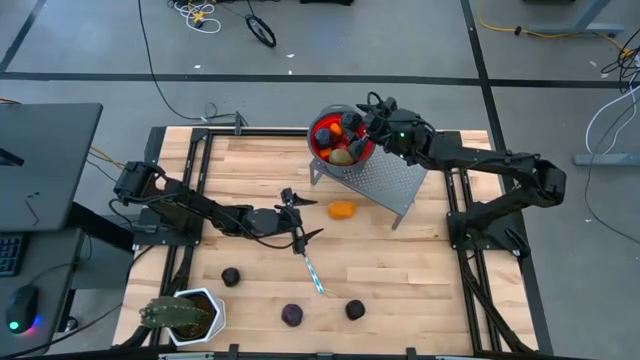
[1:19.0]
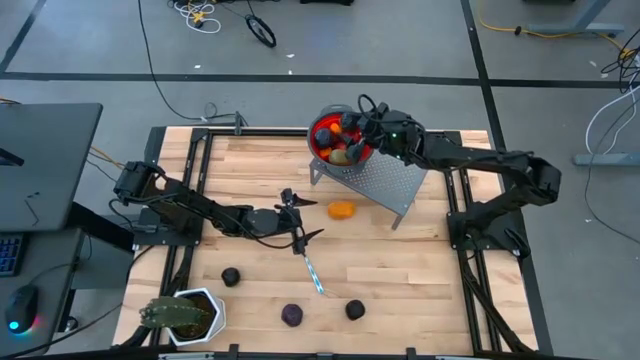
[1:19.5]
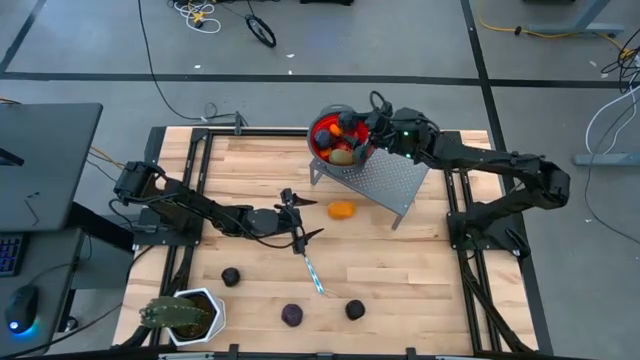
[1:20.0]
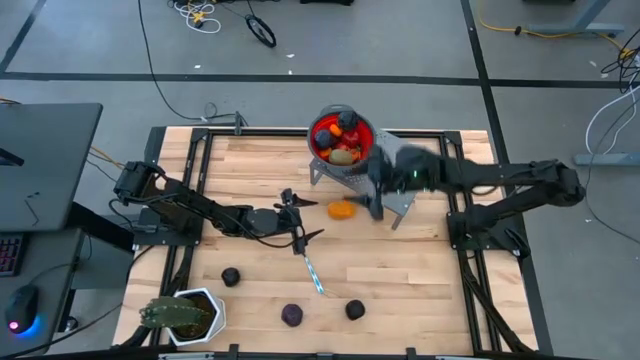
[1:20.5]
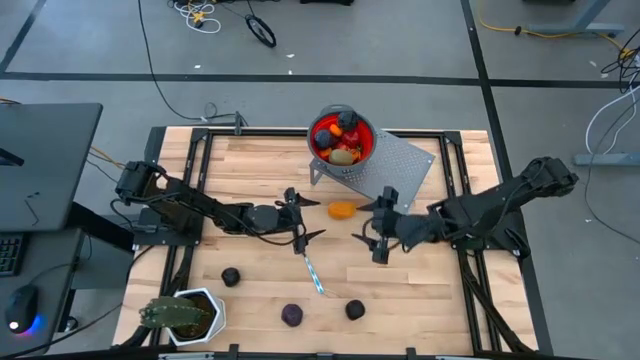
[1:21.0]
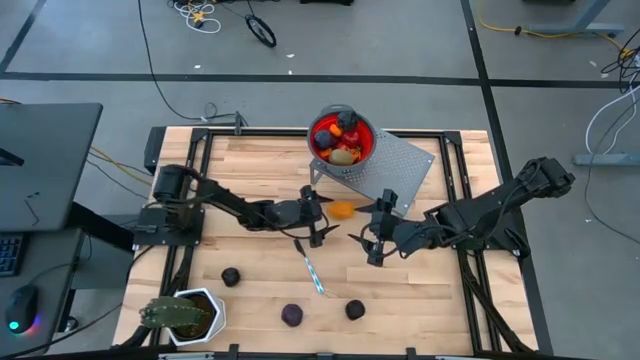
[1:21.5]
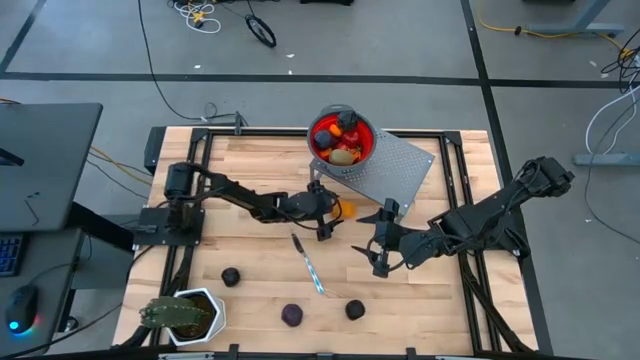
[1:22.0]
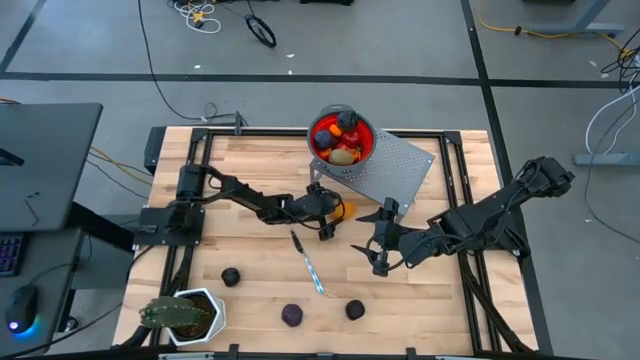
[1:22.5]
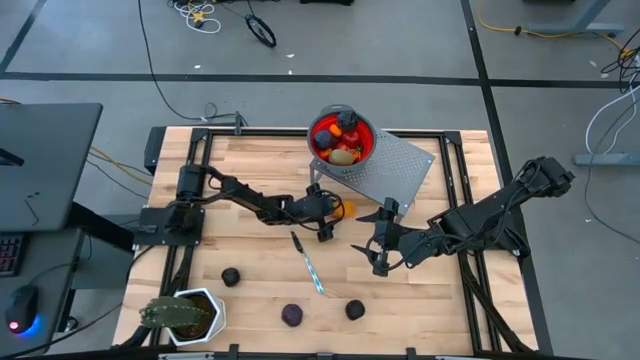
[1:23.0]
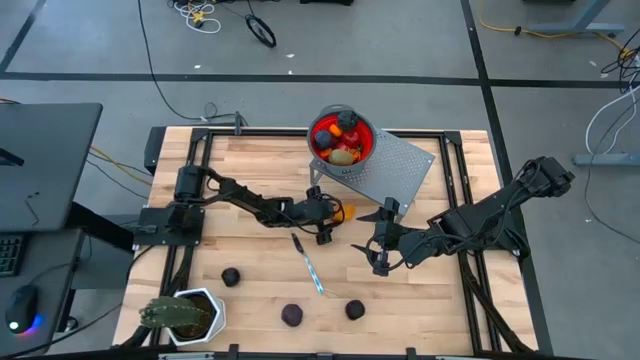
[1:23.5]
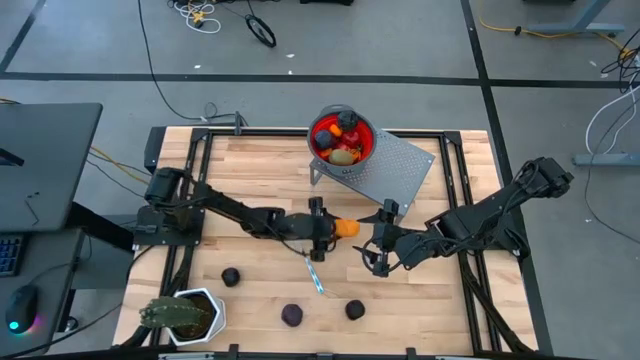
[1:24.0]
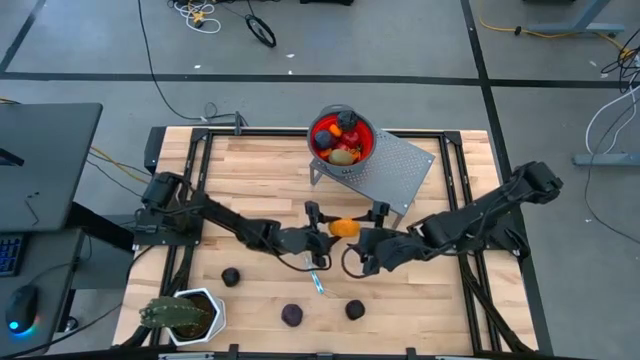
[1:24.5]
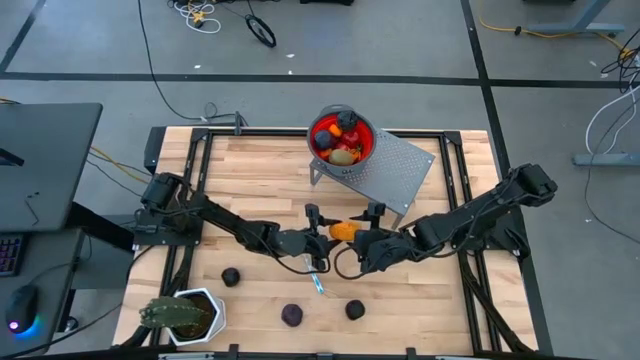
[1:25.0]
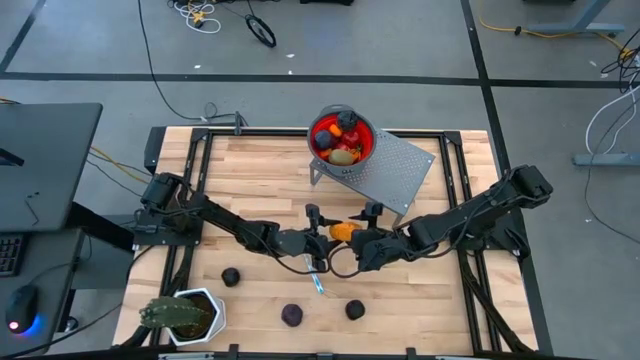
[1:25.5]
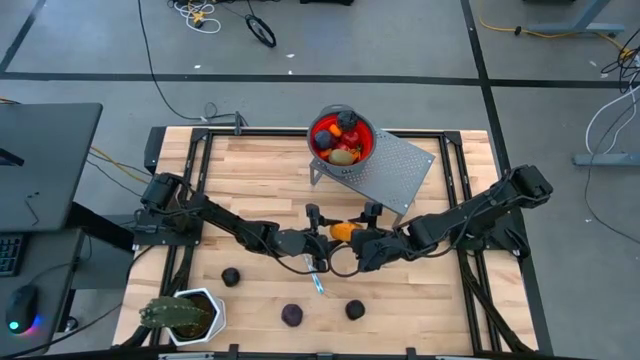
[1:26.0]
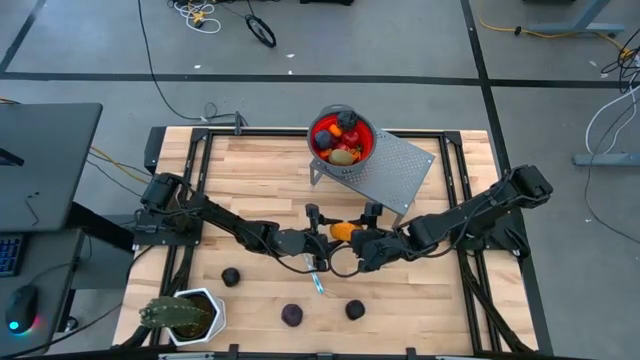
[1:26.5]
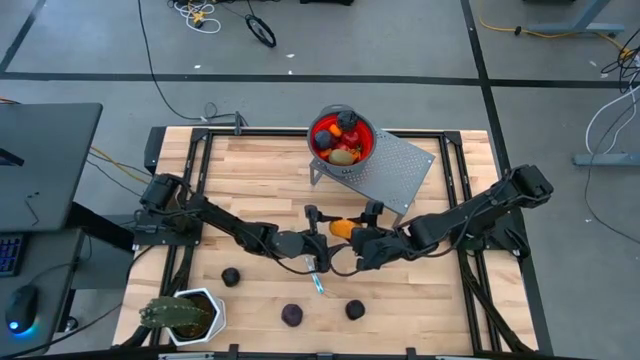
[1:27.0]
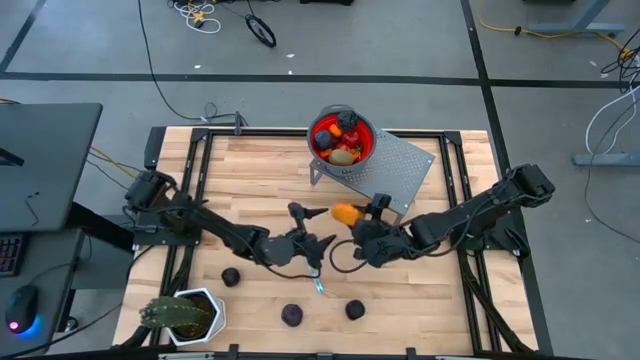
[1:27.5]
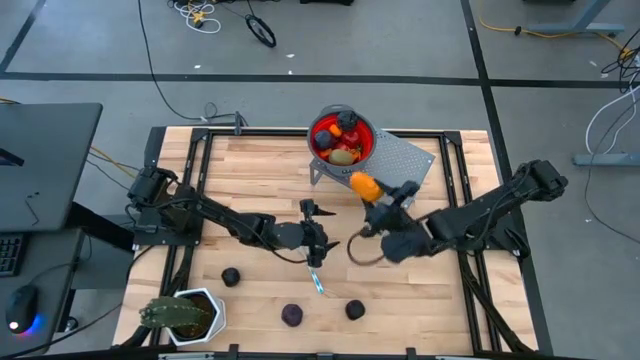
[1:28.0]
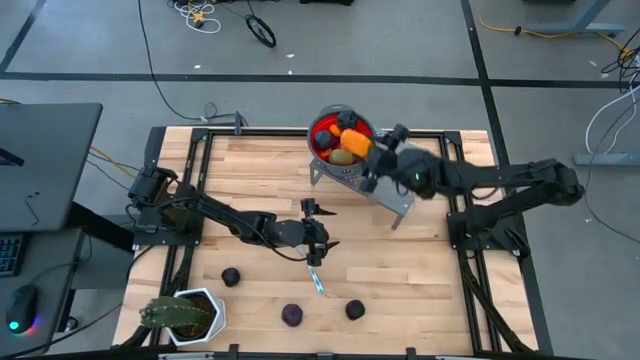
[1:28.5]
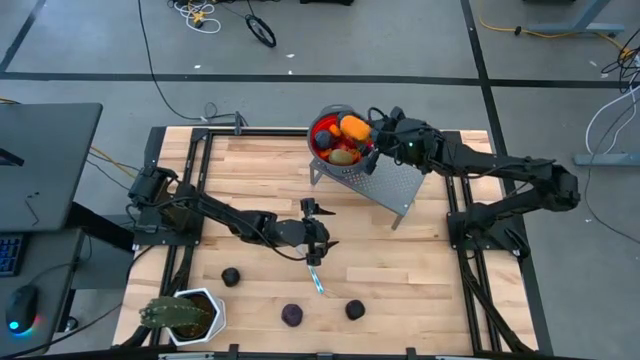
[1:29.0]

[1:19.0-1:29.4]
Task: Pick & Place Fruit
Put the mango into the red strainer bowl

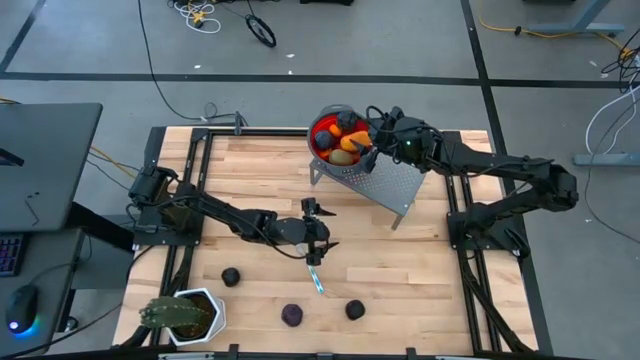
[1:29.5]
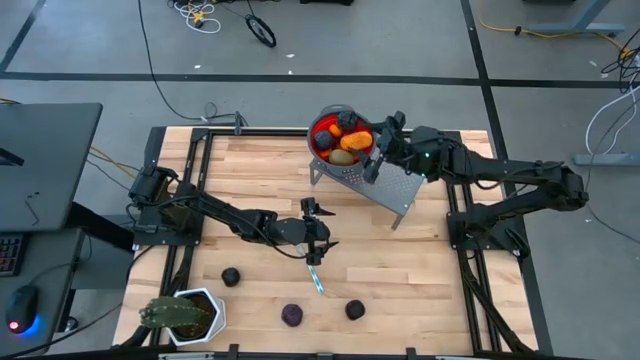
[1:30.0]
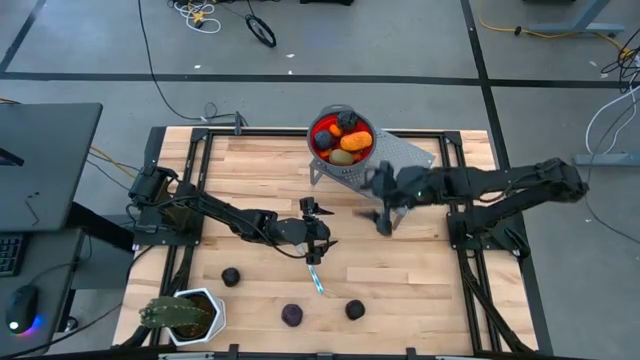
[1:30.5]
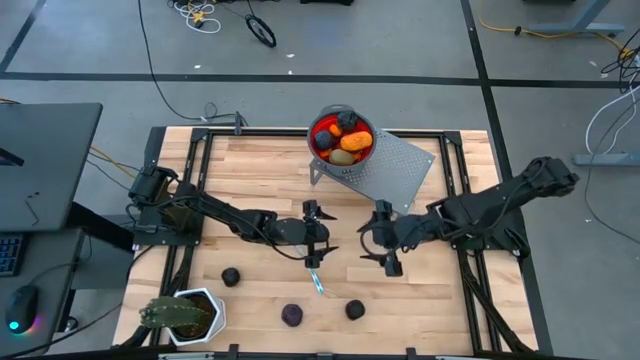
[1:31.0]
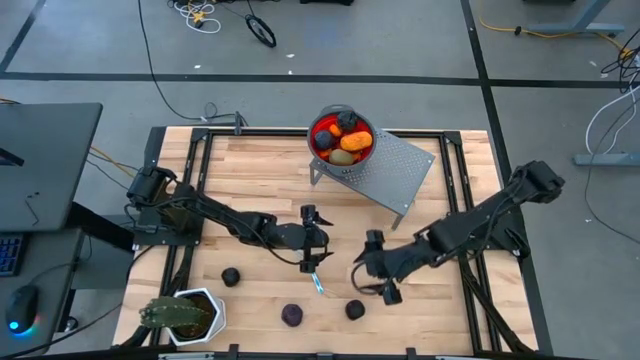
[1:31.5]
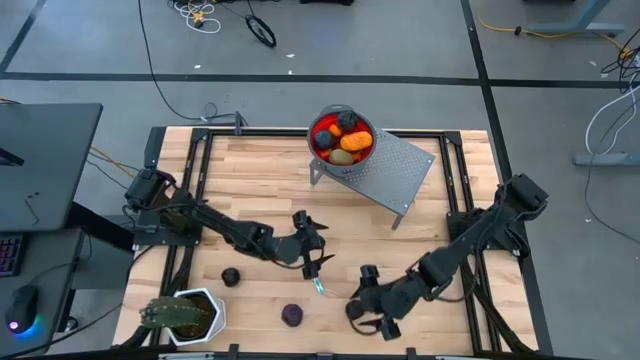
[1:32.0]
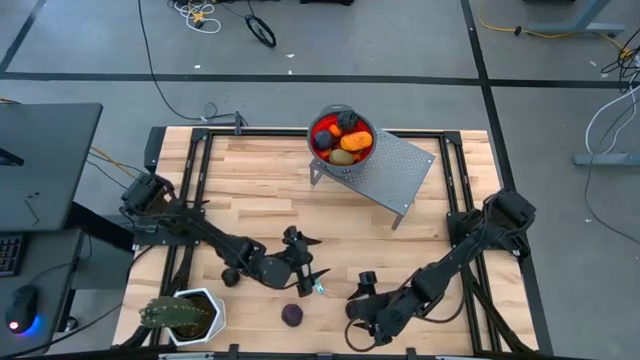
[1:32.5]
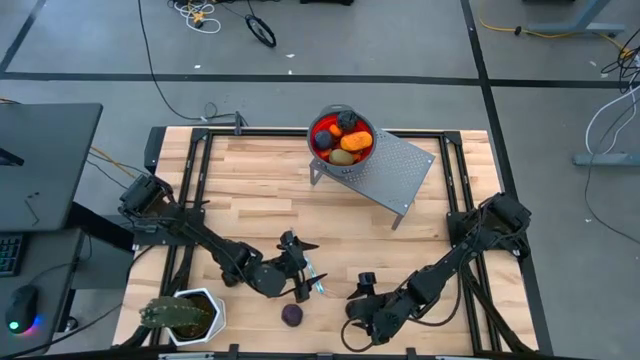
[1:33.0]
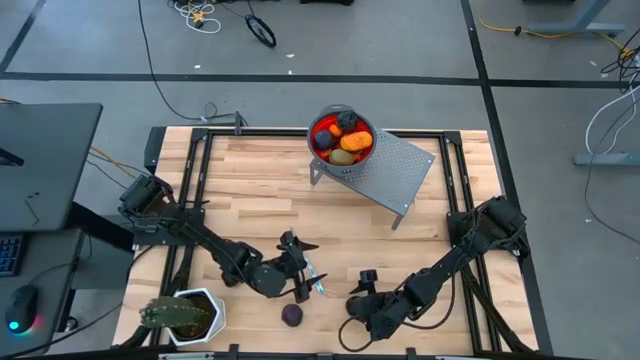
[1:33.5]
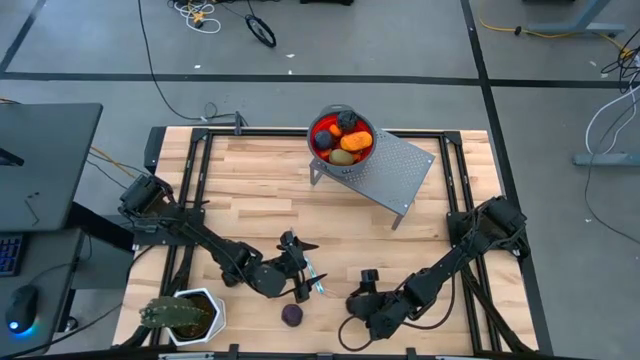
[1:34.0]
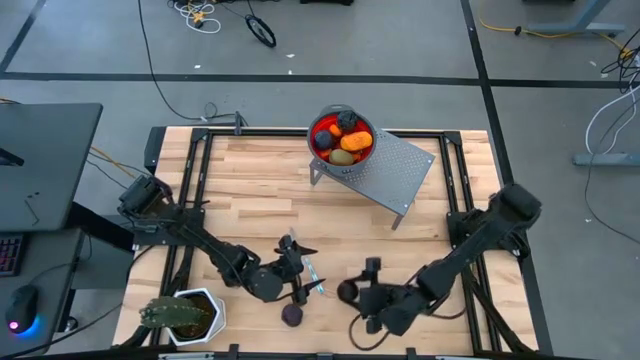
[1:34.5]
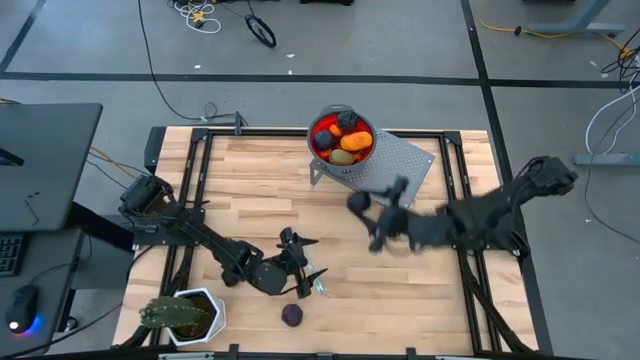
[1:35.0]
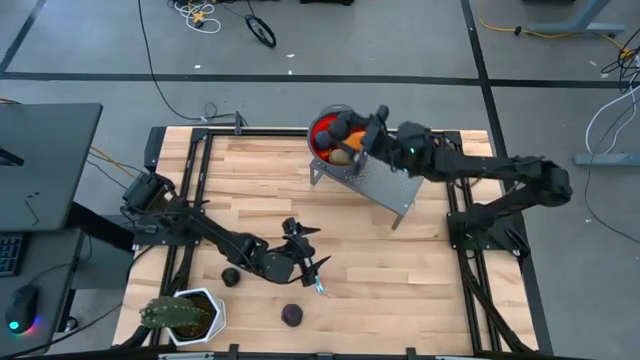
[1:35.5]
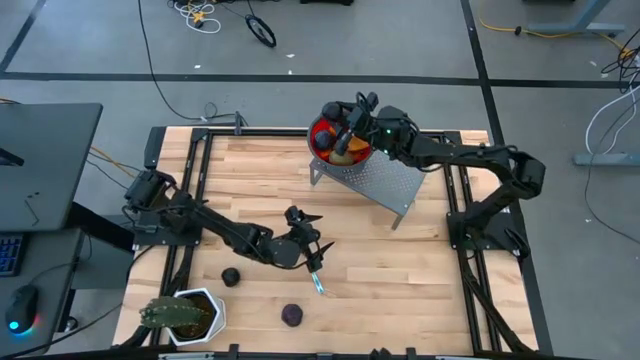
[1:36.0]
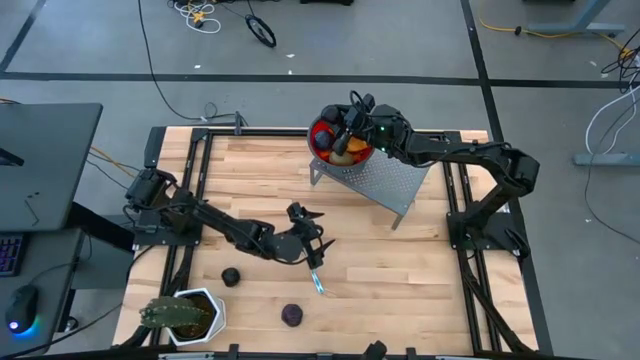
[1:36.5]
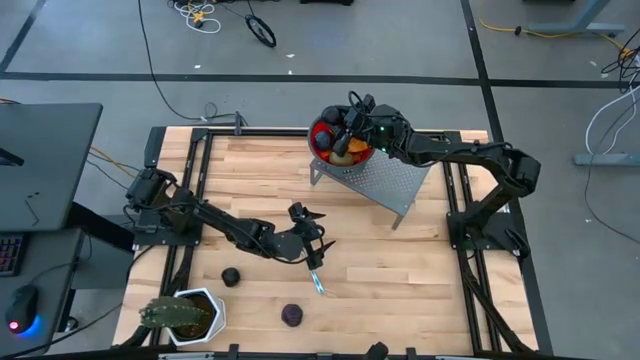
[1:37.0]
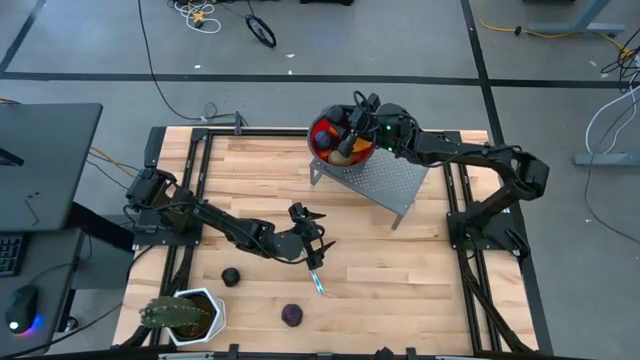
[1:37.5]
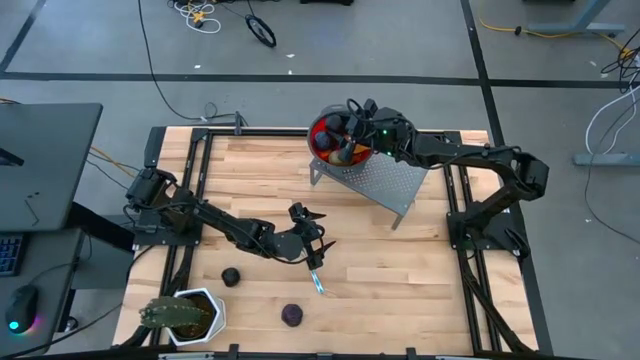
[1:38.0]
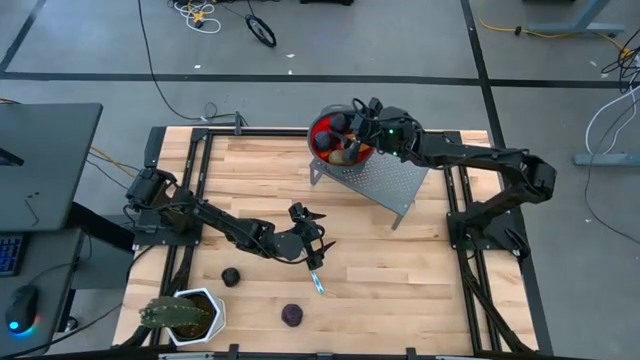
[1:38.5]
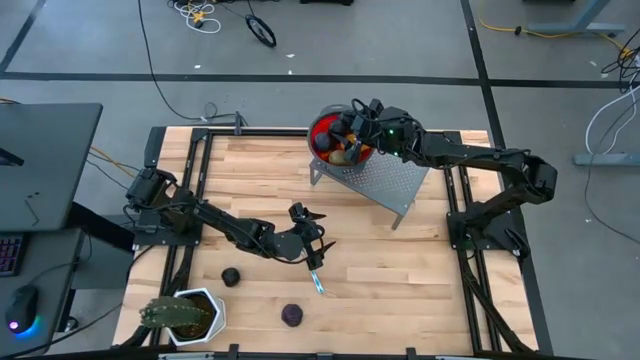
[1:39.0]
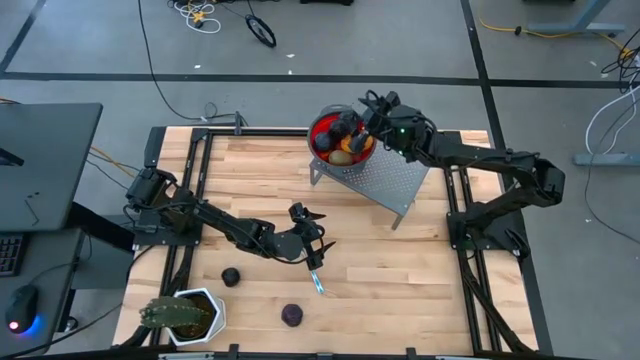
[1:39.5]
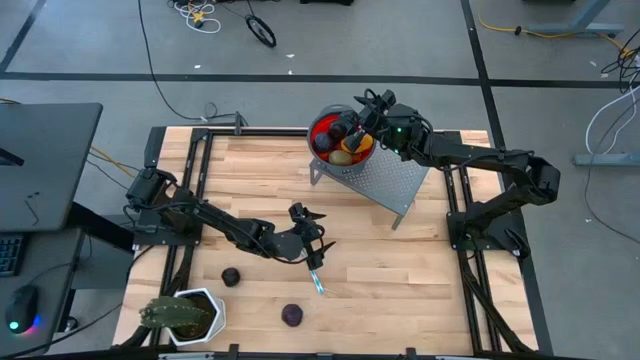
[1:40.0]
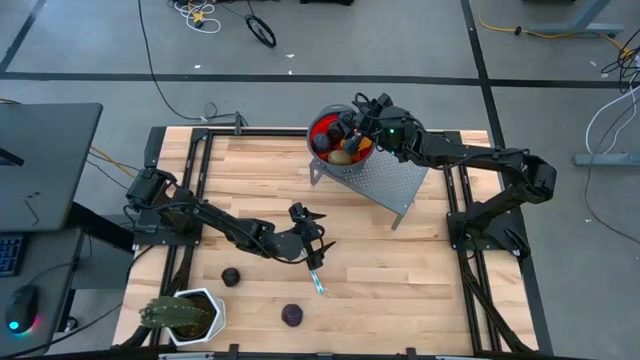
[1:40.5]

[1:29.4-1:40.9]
Put the mangosteen into the red strainer bowl
